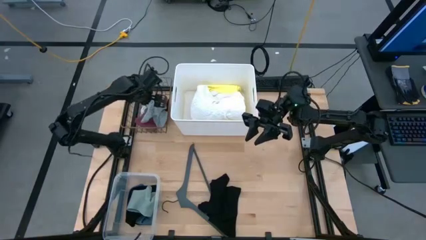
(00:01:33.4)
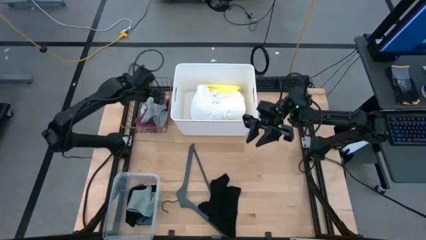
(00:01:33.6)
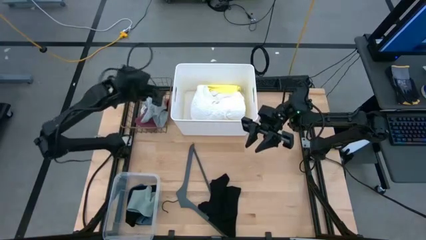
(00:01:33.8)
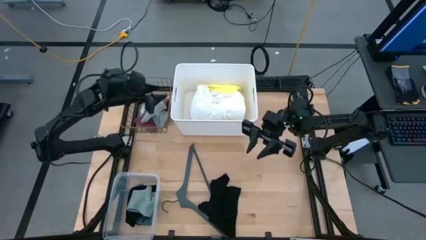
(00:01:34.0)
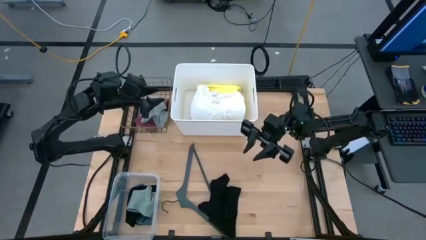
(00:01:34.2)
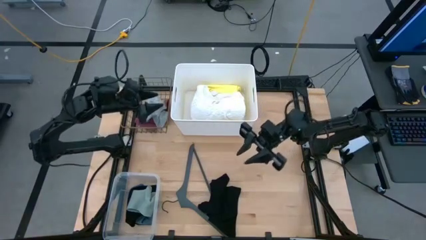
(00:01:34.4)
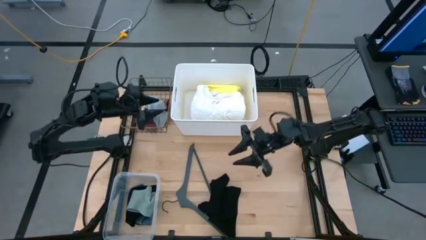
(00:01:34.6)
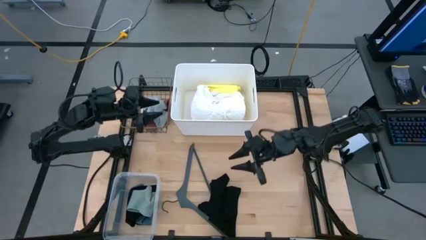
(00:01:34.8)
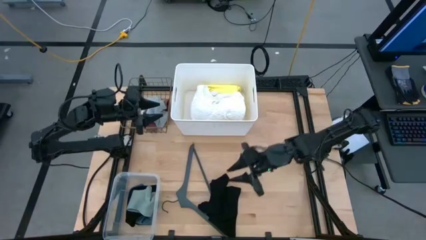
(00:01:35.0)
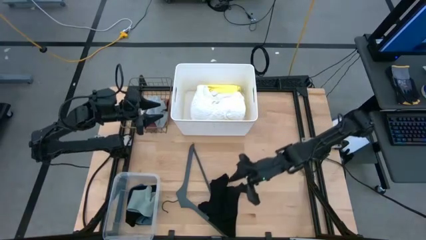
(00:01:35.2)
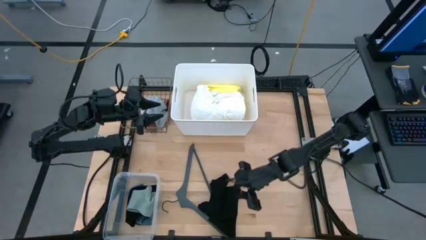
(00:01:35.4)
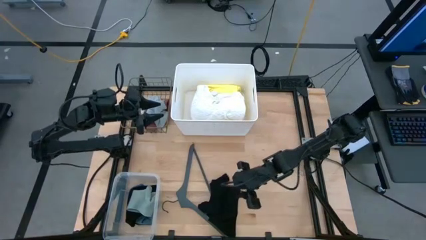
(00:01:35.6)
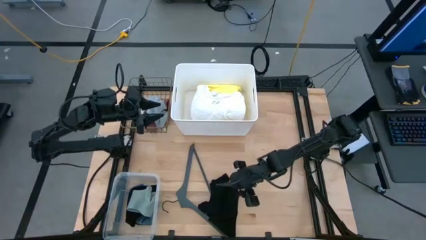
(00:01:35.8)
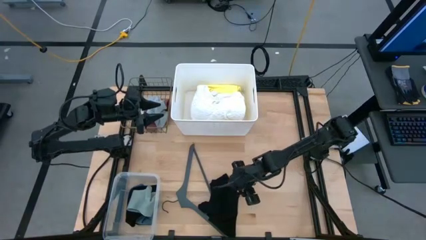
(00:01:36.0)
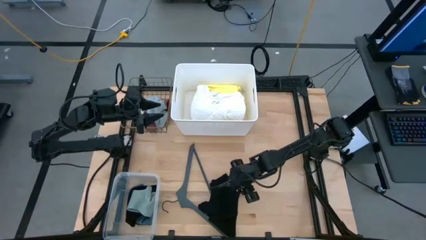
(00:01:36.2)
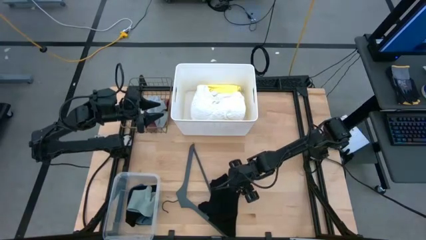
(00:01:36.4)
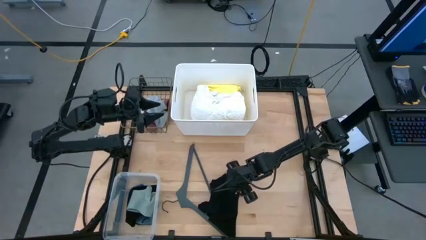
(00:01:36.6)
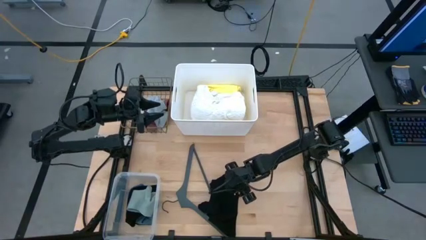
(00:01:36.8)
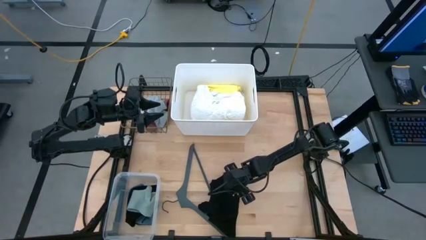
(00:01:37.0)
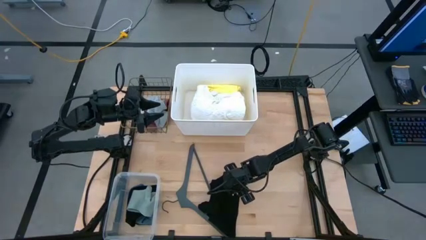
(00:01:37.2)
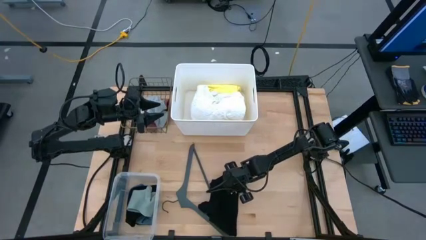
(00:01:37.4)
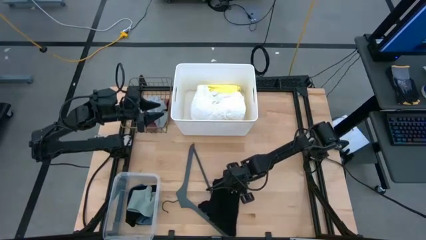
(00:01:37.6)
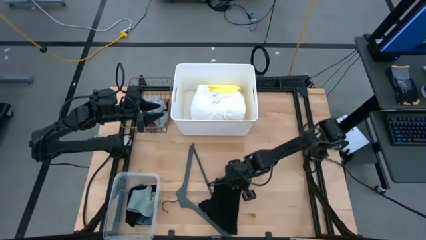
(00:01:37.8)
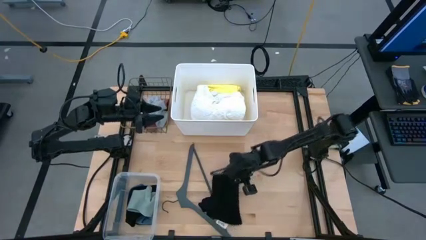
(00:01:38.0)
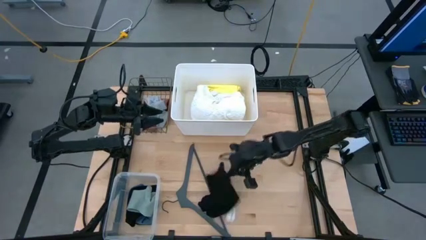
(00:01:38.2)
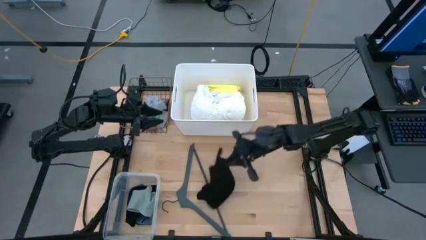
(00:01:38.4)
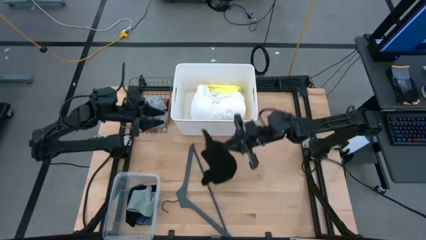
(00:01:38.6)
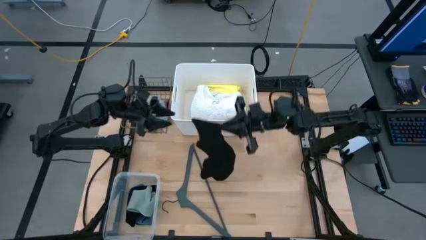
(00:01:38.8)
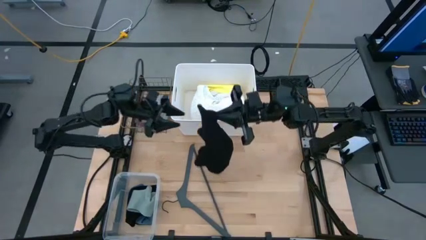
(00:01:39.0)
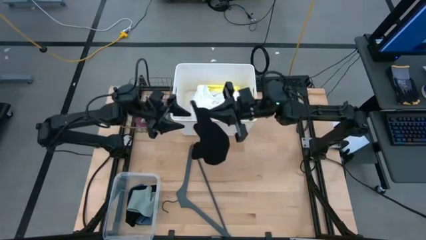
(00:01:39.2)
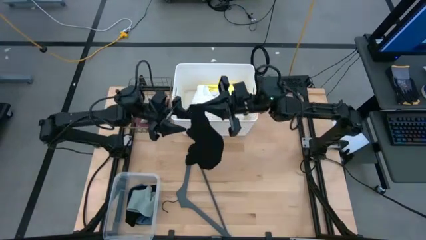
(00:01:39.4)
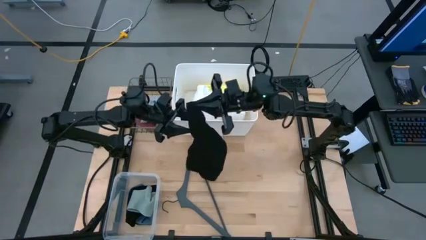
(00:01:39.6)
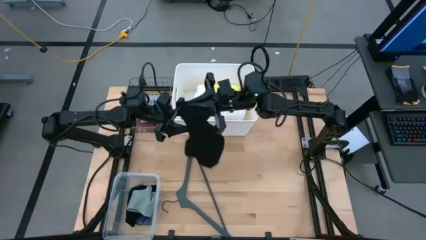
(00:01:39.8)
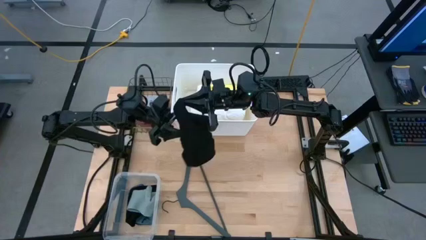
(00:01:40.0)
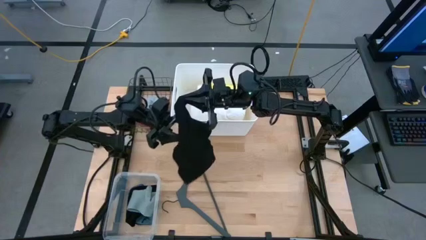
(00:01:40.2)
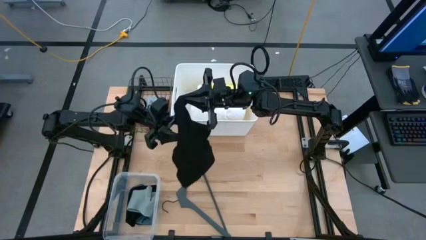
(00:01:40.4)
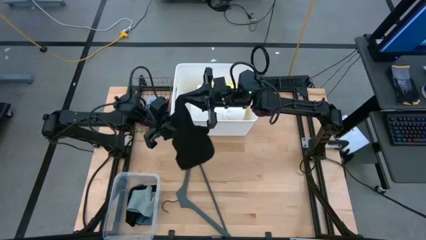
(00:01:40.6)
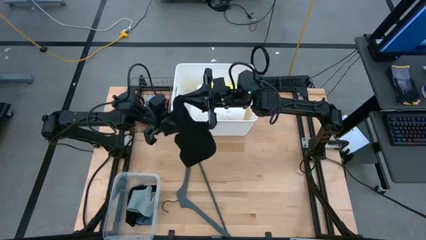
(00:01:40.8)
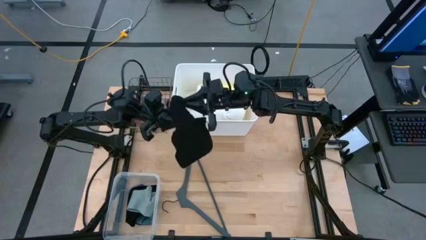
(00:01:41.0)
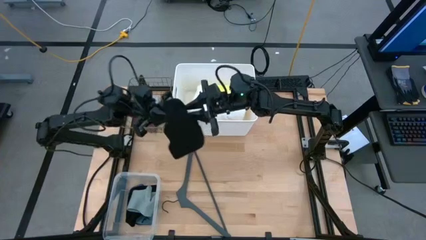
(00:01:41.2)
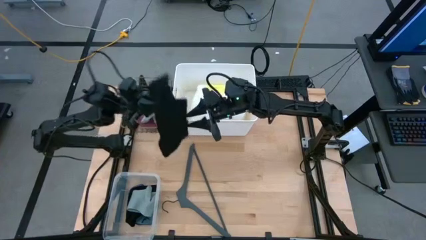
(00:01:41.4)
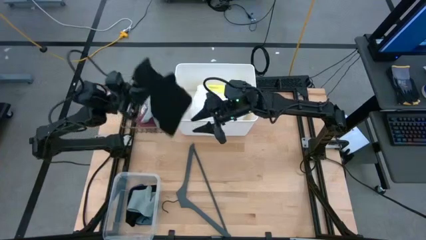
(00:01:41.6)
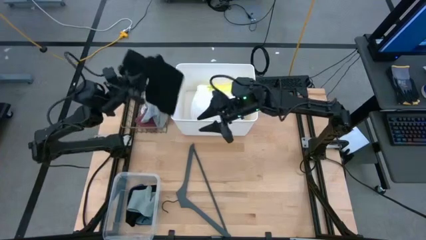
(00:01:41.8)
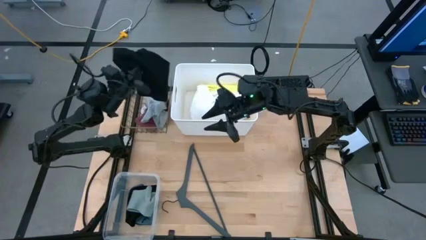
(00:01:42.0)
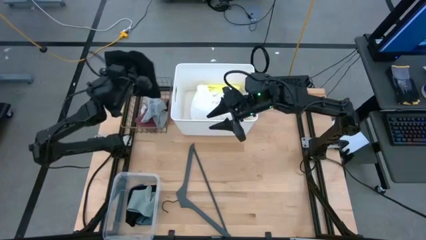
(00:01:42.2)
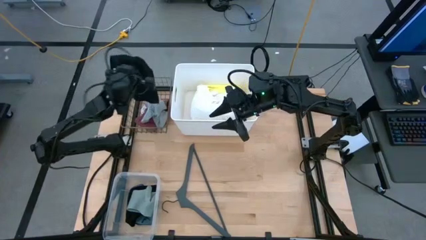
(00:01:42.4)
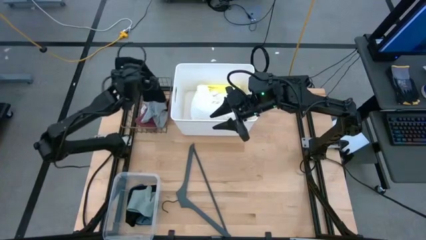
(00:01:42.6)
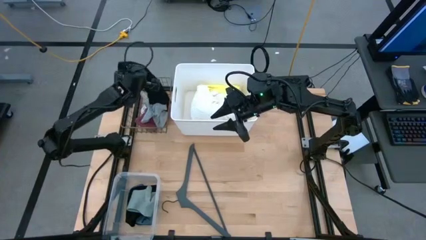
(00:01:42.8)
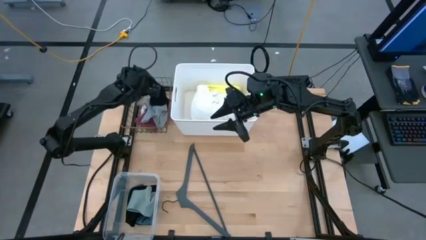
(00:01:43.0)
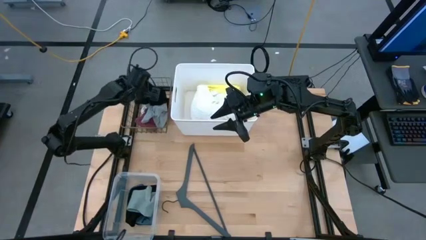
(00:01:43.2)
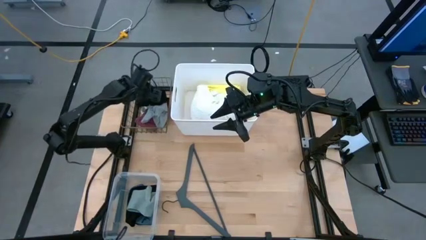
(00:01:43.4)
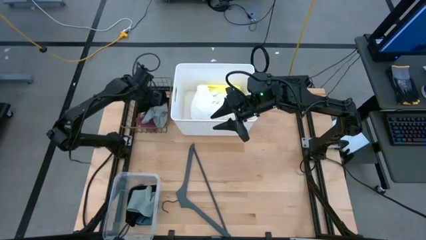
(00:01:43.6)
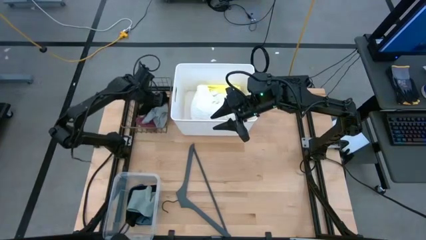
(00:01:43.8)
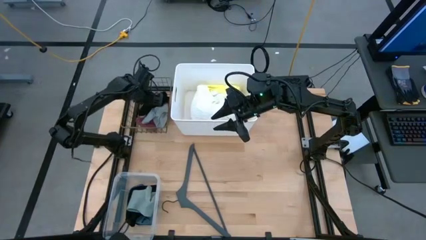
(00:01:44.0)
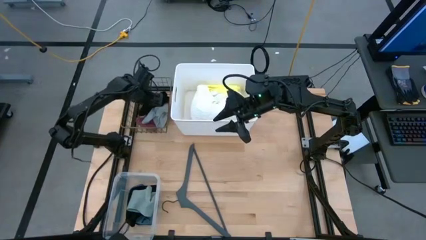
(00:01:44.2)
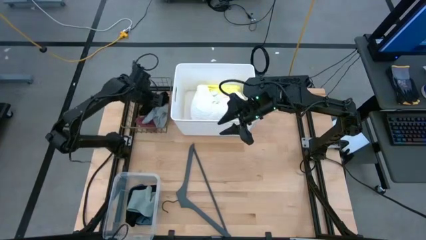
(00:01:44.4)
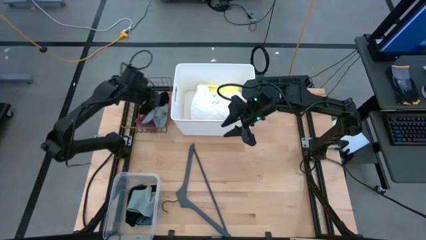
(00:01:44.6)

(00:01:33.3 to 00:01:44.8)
Task: Pick & Place Cloths
Put the black pants into the wire basket
